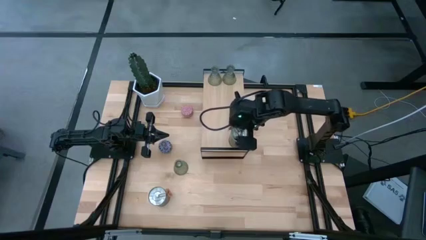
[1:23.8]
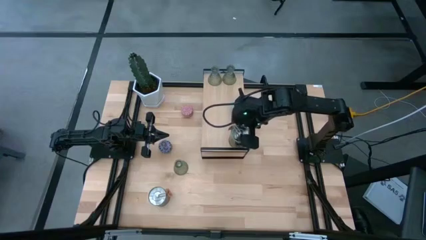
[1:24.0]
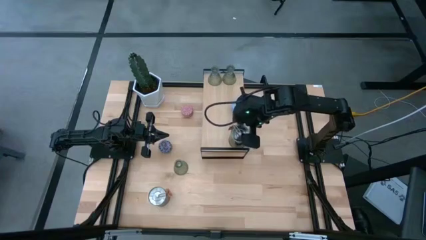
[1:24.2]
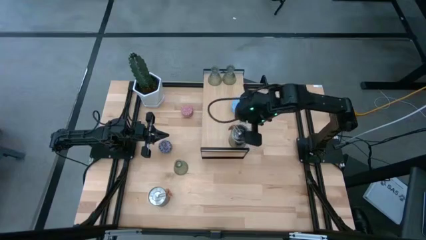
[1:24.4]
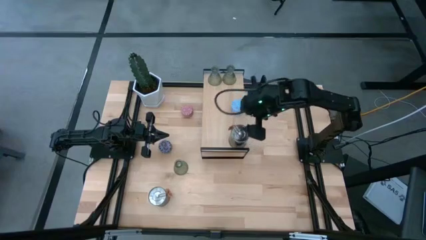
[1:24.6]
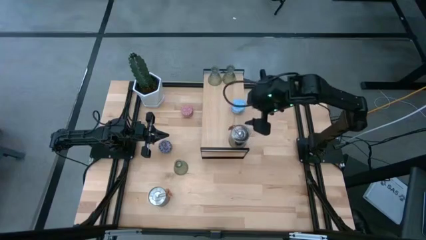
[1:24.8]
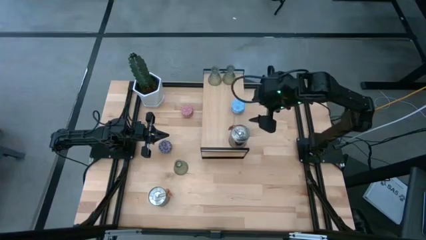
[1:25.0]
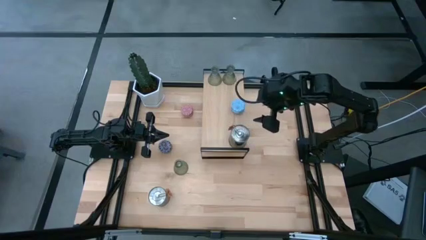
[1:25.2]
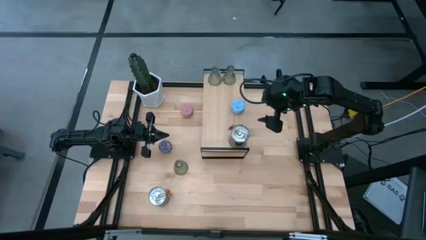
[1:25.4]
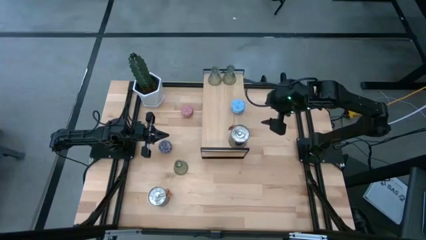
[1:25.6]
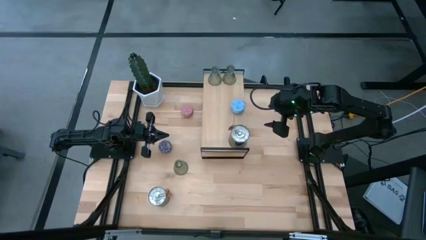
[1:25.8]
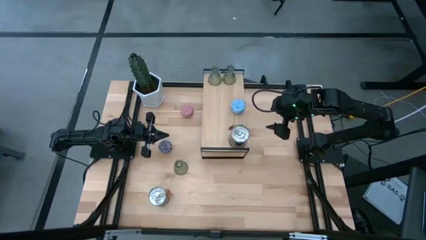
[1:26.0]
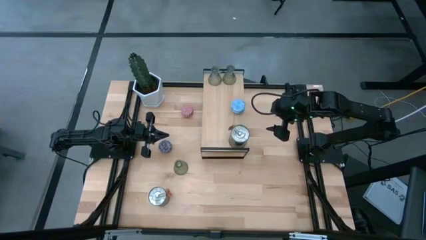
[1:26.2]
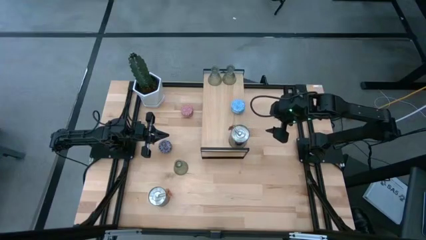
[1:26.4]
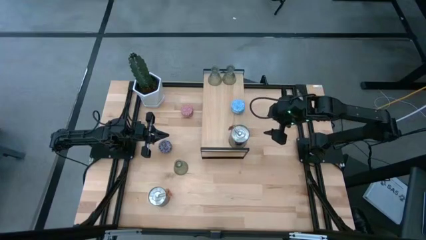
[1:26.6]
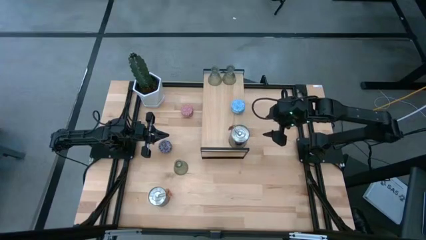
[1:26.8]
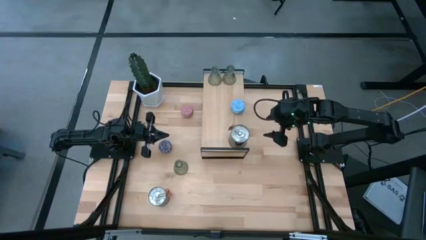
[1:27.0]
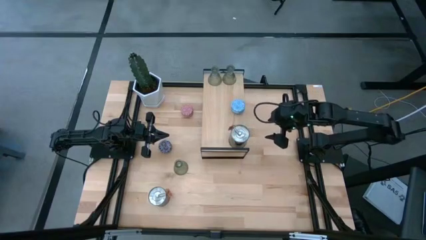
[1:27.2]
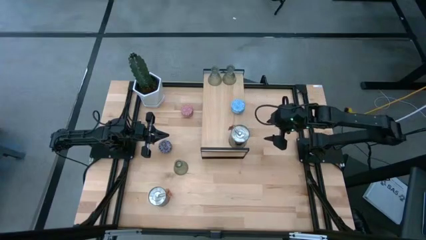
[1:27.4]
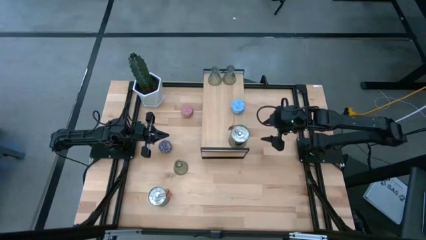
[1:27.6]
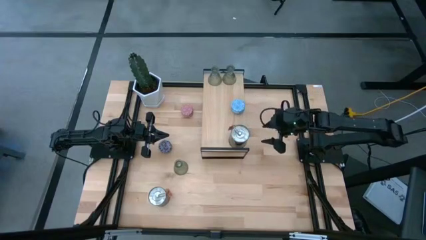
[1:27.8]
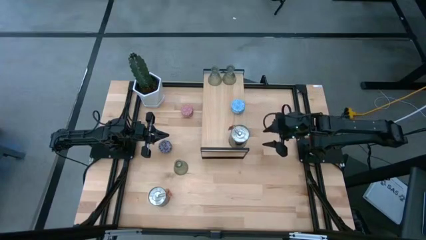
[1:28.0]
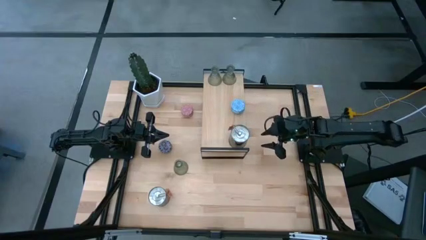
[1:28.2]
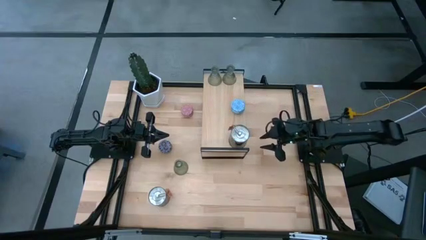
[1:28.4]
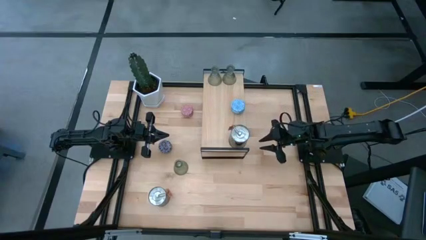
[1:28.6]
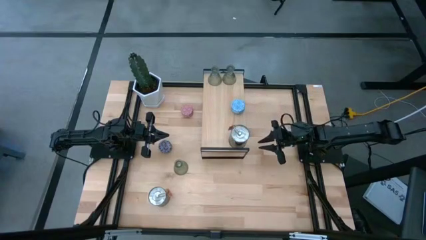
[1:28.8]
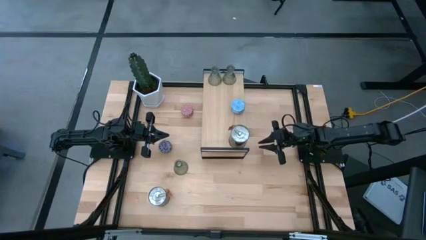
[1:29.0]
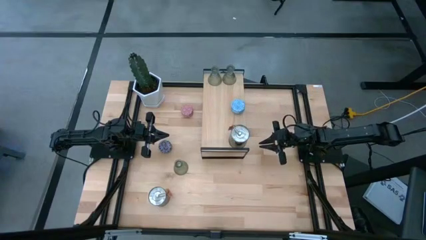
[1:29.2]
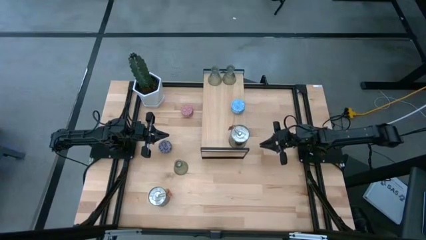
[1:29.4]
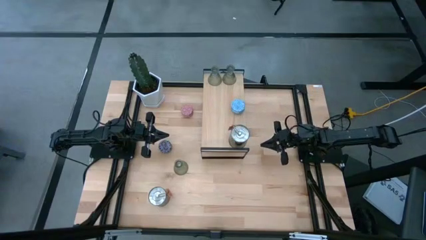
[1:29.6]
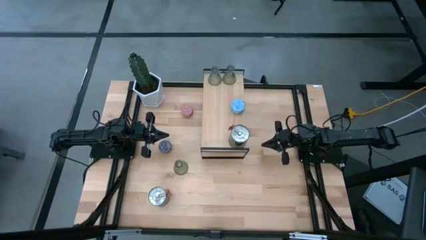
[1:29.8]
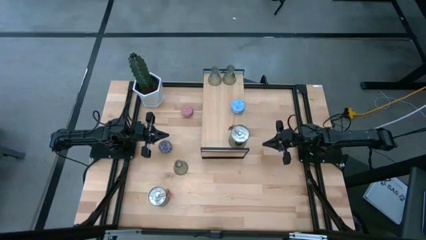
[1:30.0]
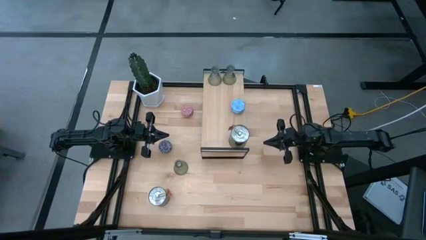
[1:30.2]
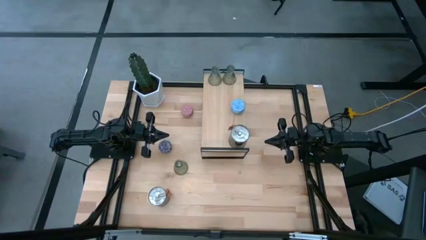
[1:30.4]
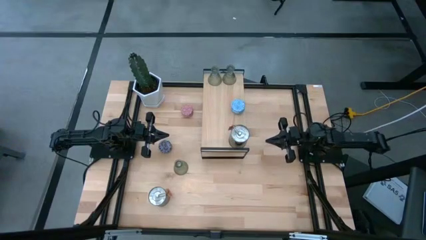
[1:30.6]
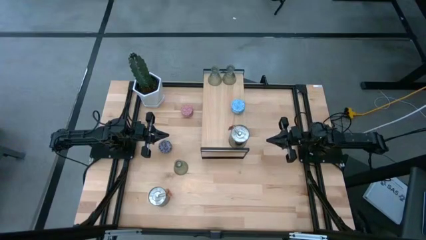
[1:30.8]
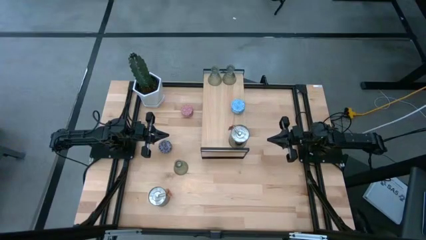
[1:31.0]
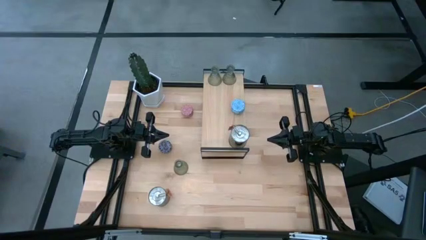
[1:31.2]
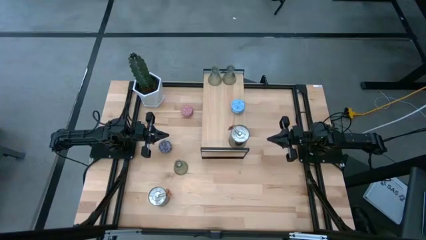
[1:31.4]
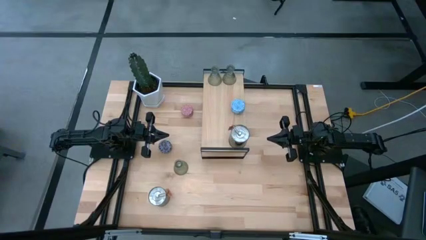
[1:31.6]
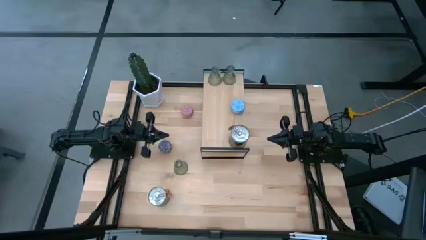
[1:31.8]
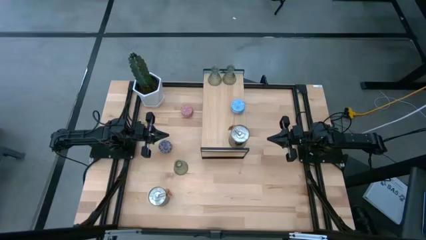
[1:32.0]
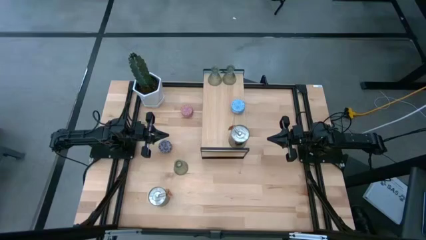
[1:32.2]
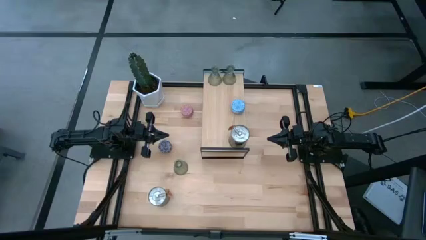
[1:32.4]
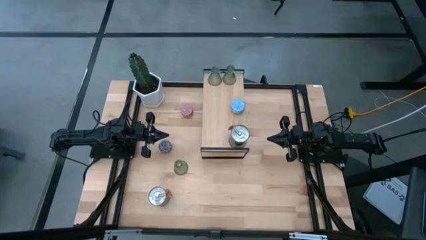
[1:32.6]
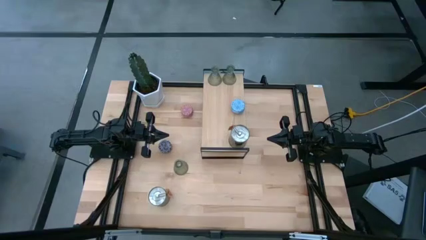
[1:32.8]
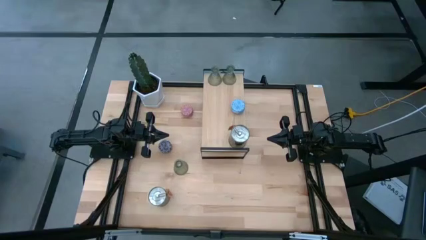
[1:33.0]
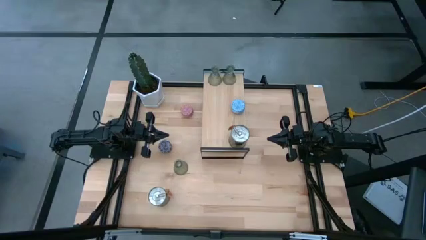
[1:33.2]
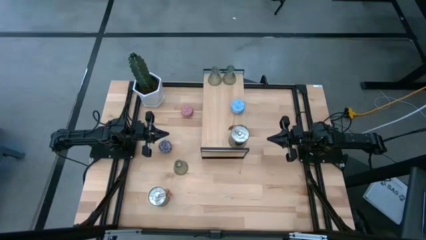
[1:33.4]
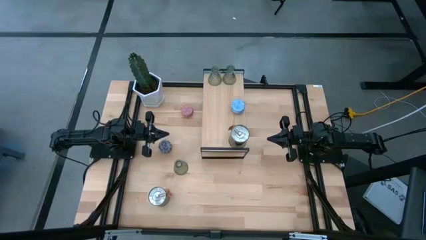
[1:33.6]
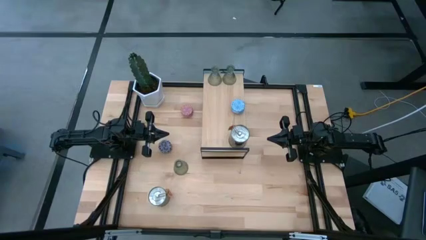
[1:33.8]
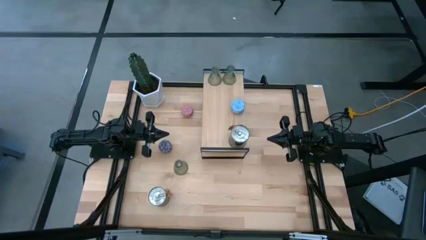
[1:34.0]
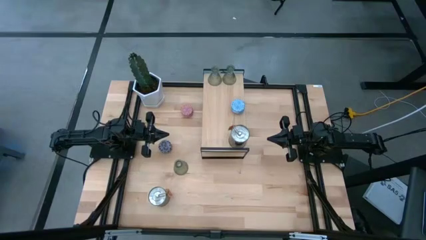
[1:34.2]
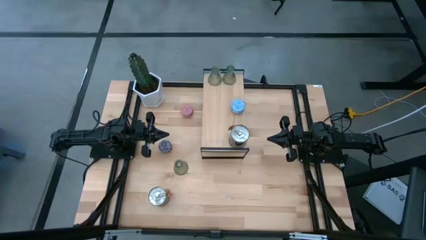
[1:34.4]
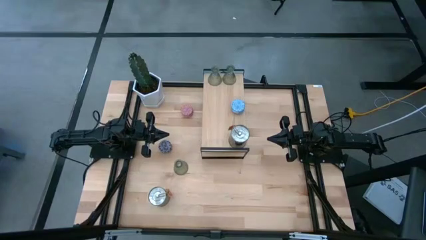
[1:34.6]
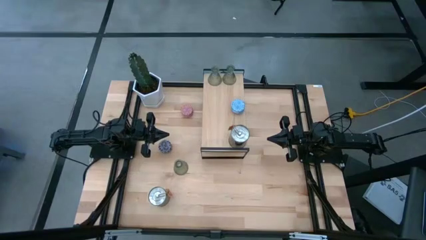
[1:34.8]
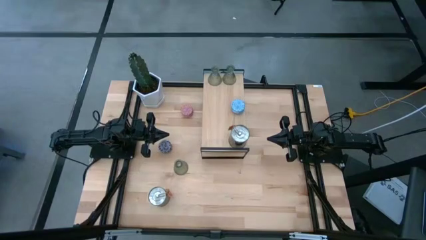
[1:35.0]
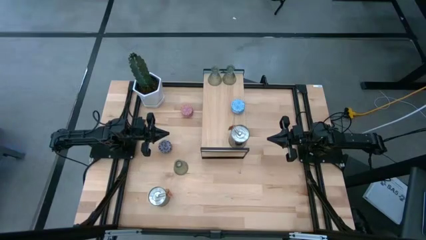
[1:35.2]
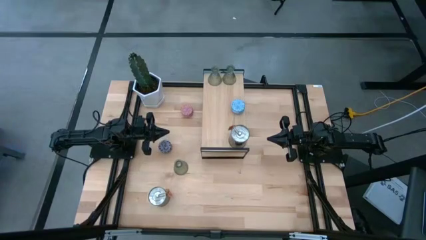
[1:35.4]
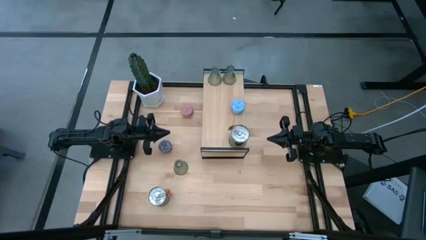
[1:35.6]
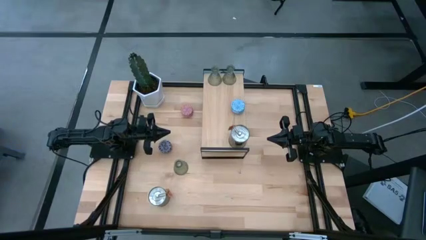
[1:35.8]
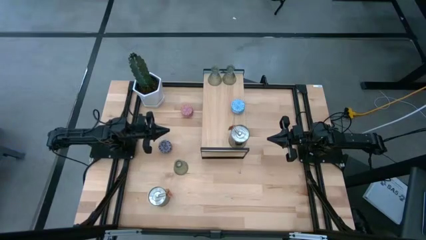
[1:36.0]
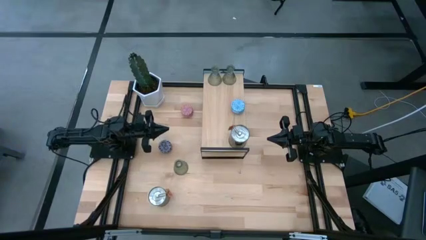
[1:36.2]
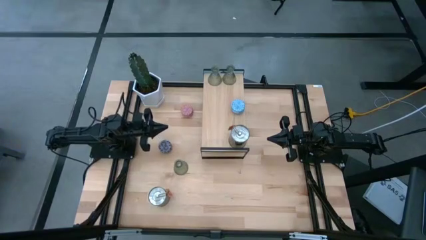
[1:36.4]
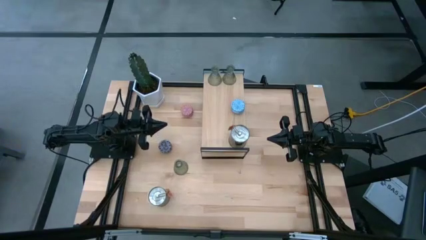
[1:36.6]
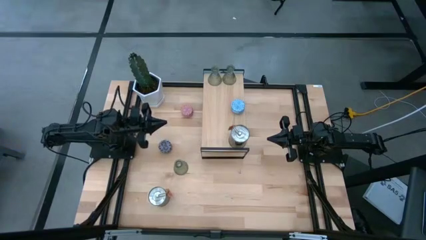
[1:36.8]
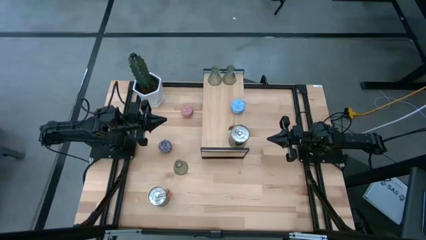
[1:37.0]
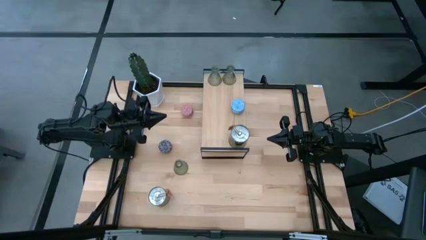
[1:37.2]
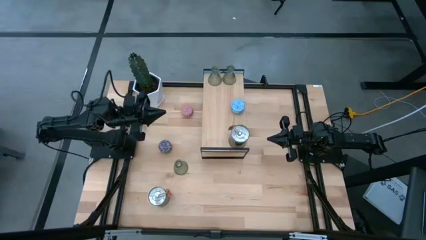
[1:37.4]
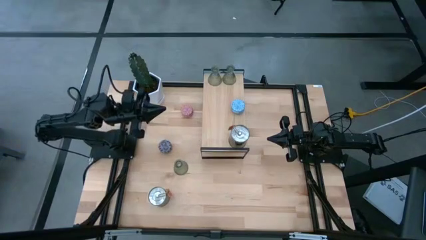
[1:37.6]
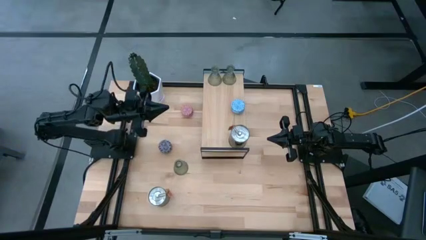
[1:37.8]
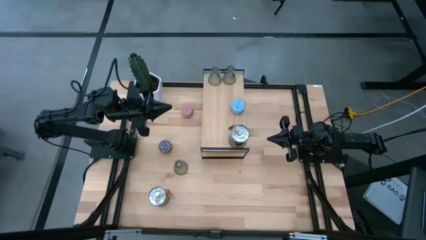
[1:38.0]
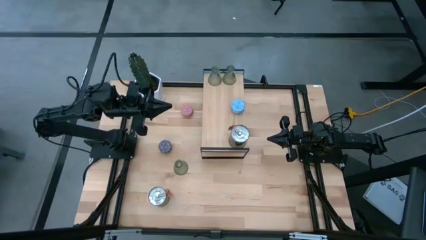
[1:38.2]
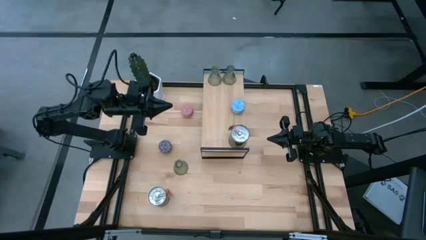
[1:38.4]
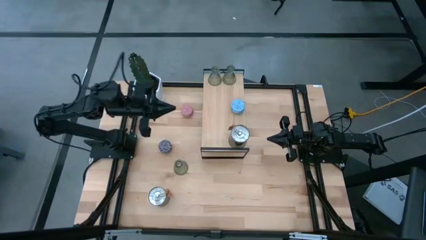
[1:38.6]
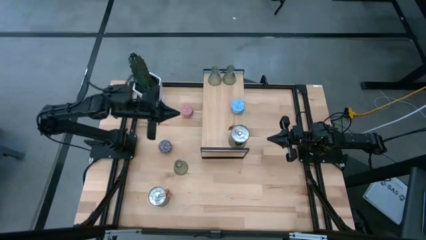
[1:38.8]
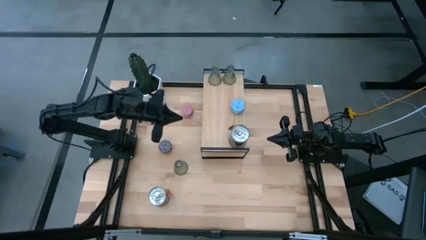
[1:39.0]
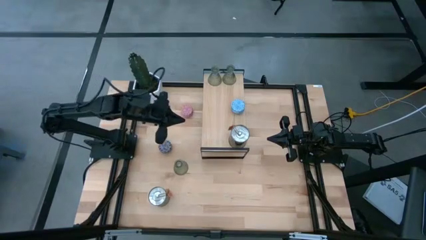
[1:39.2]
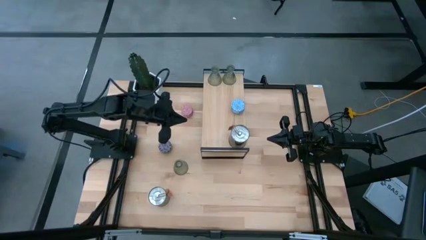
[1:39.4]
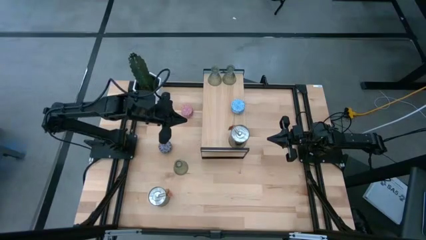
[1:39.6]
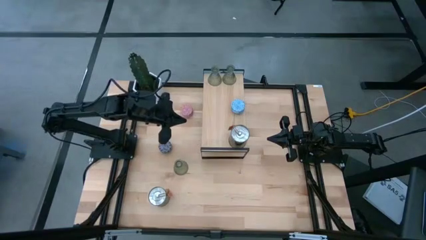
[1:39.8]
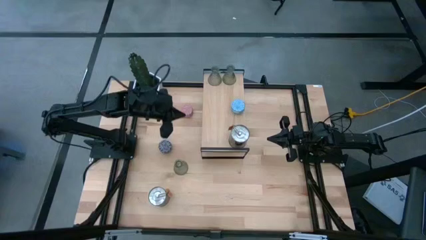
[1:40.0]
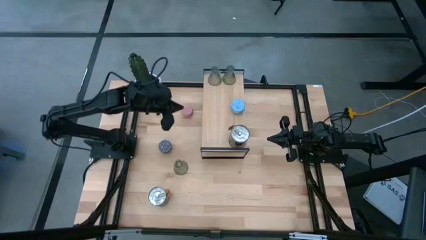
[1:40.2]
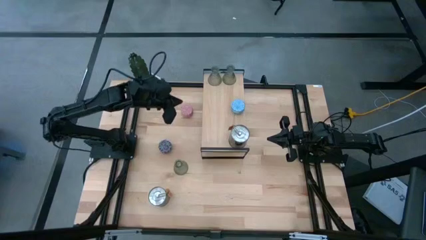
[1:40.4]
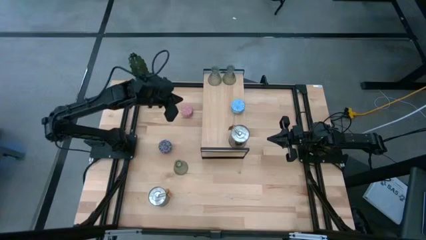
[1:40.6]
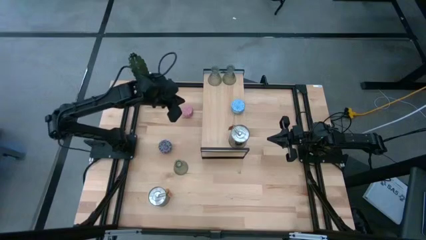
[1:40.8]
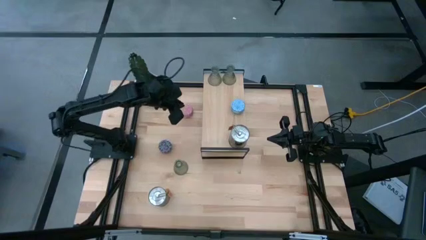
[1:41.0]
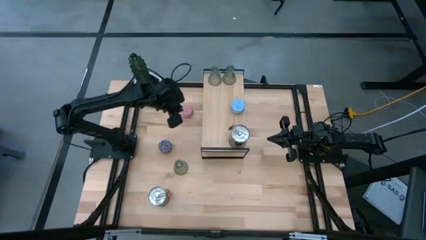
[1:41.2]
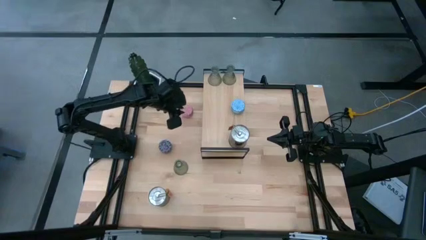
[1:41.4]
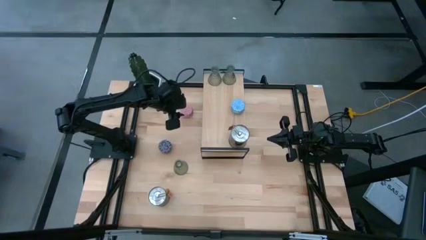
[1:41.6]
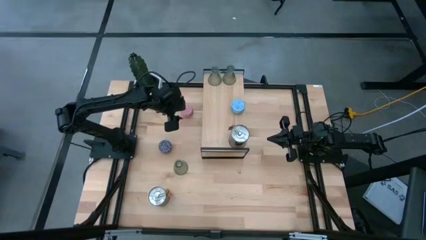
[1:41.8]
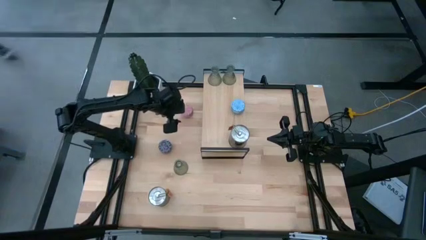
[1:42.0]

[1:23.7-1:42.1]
Task: Pick & Place candle stick holders
Put the pink scented candle on the shelf
